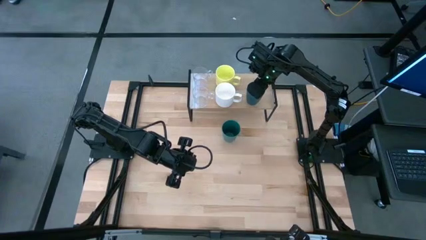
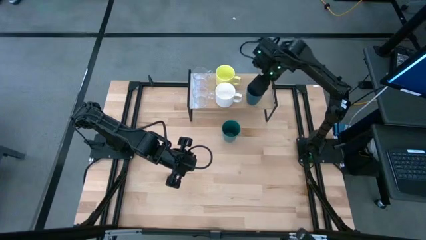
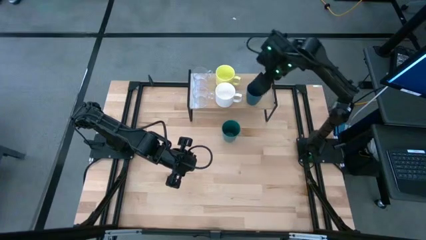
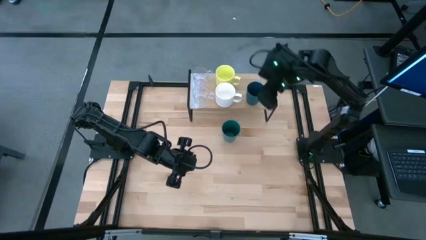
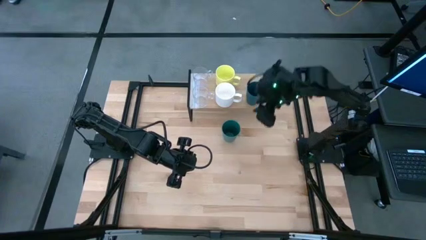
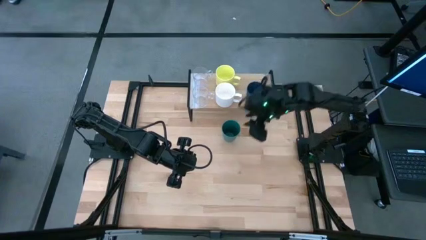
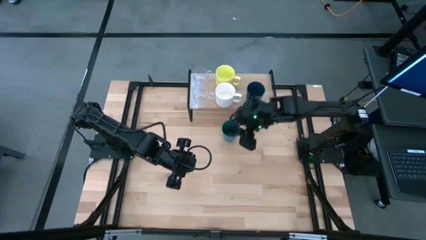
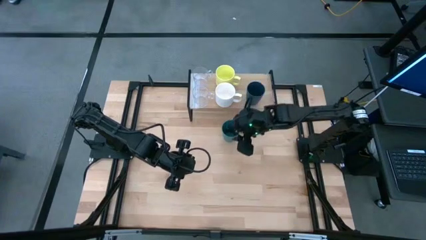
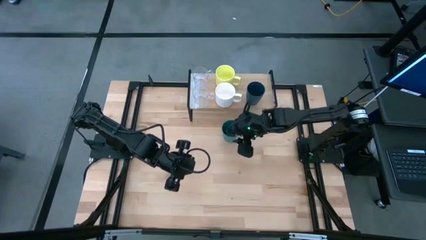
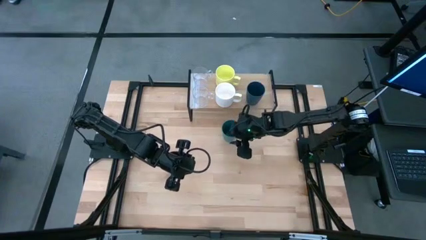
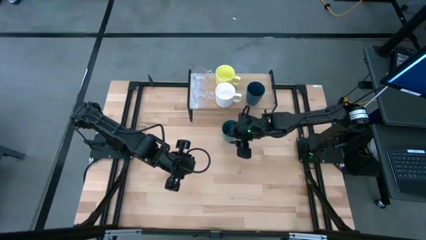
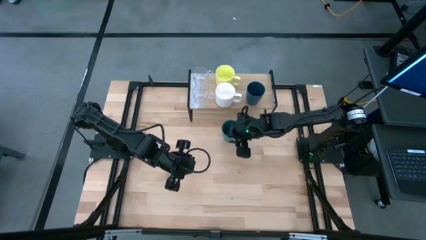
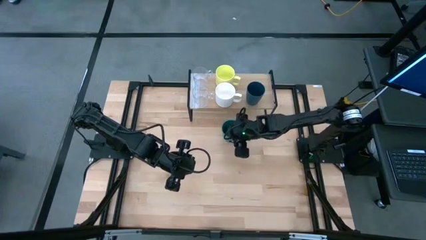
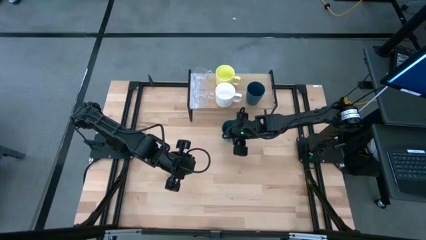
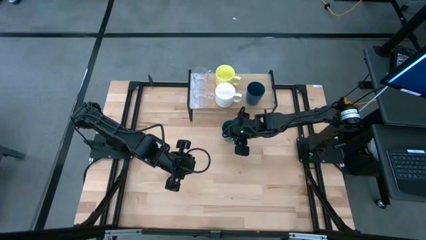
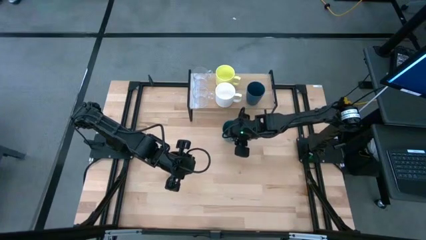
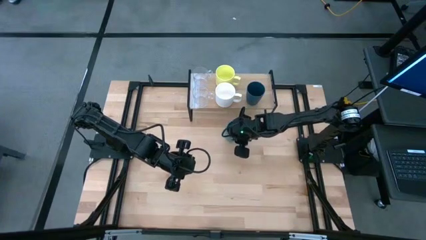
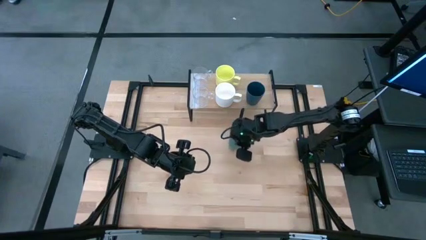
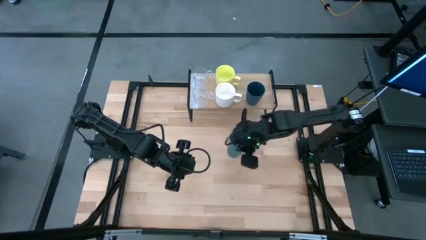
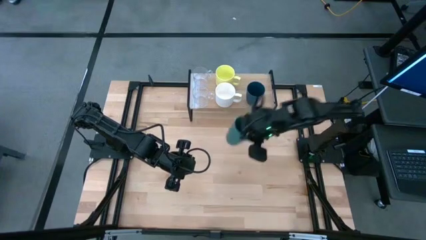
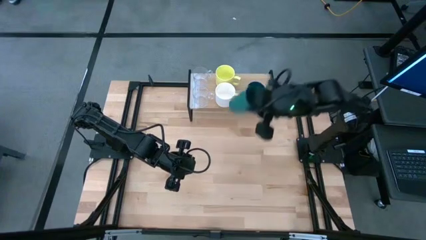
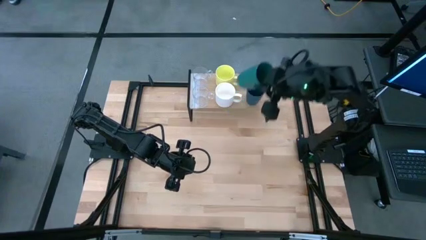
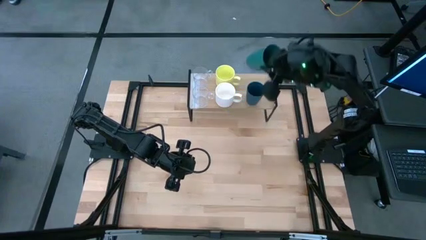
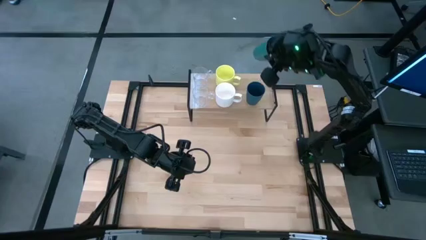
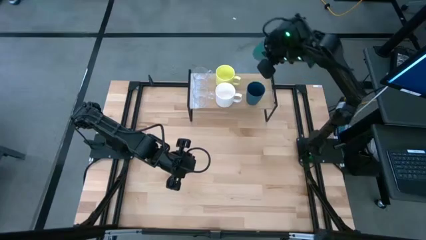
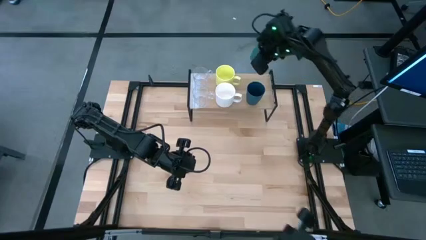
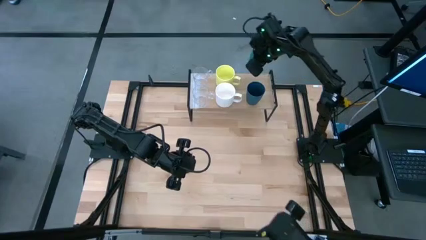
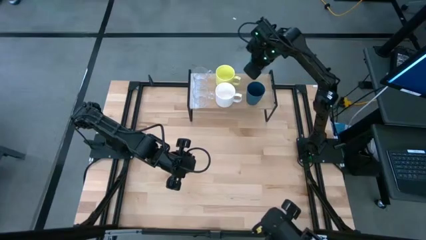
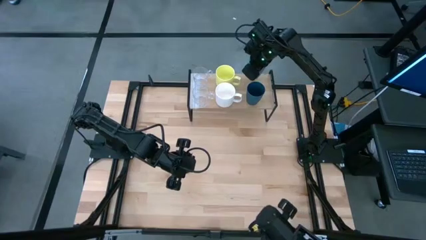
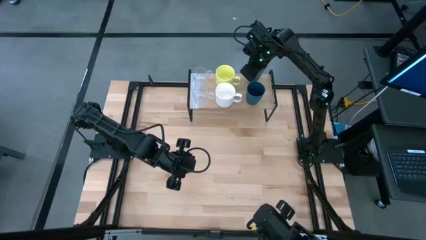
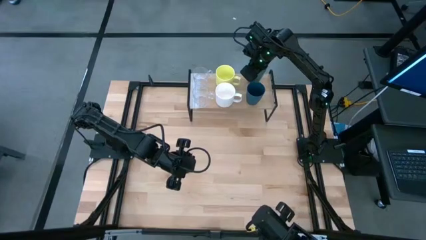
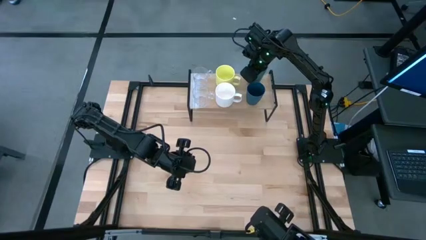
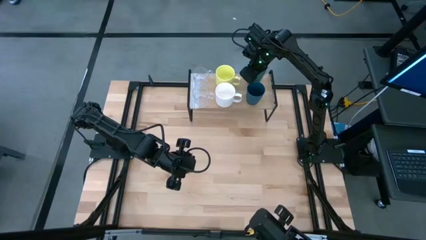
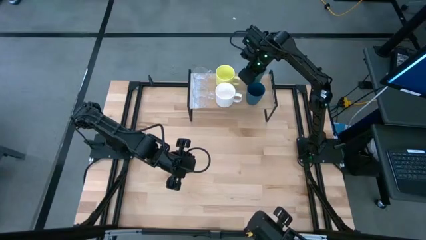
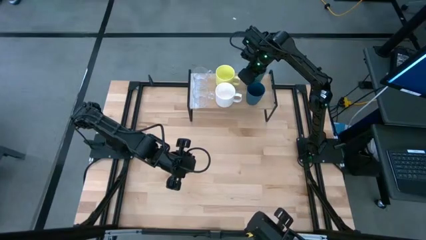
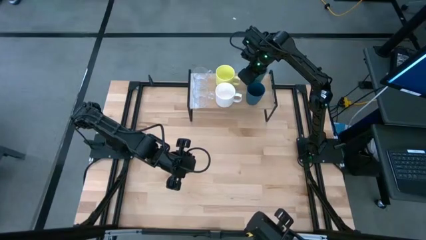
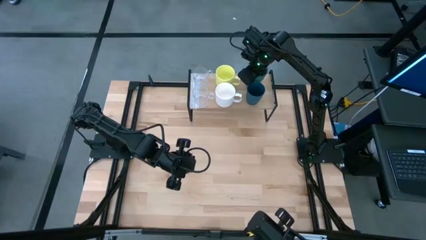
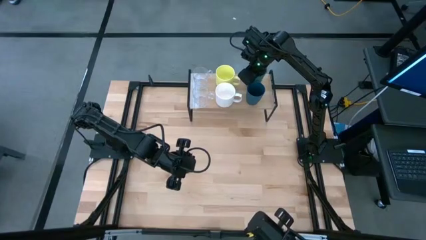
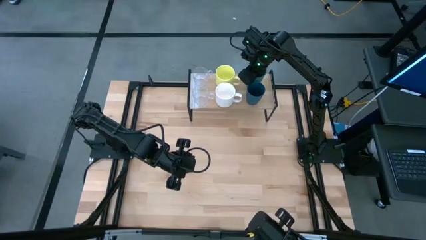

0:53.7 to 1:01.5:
Task: Stack small to large cups/mugs on shelf
Put the green cup on the shelf

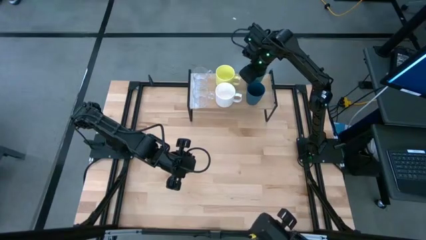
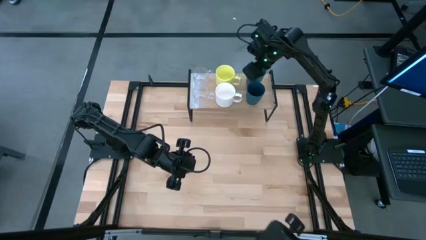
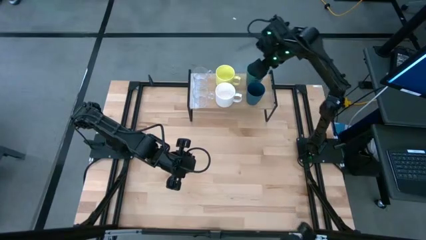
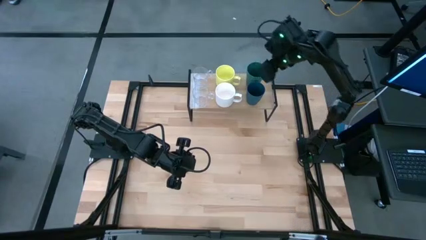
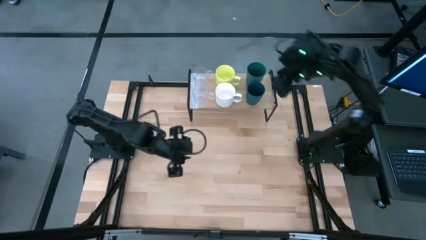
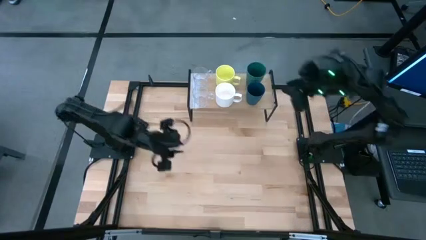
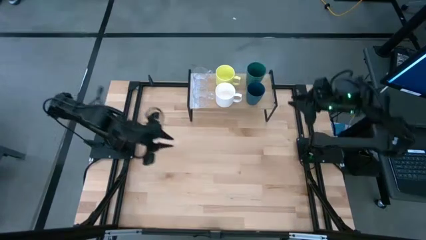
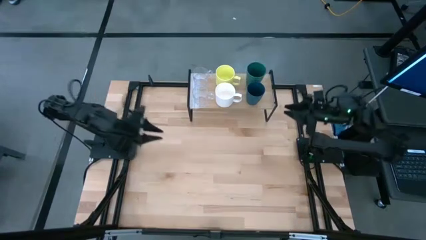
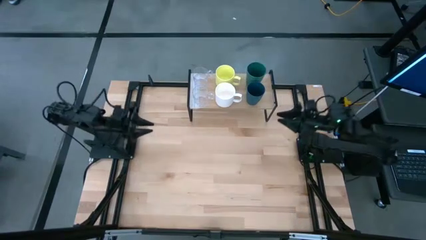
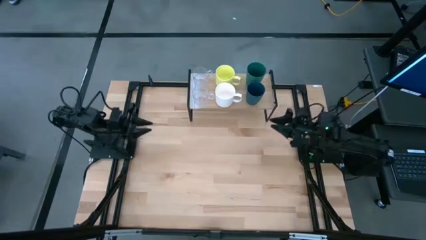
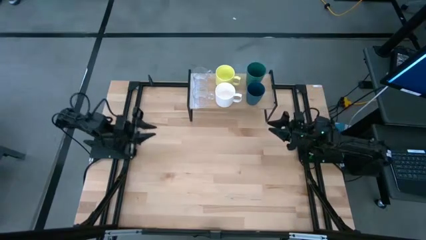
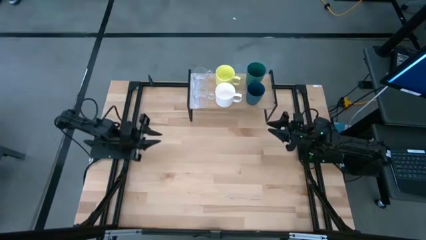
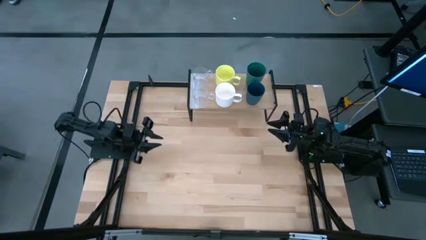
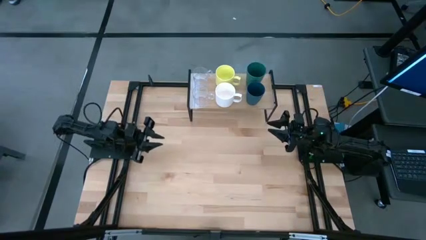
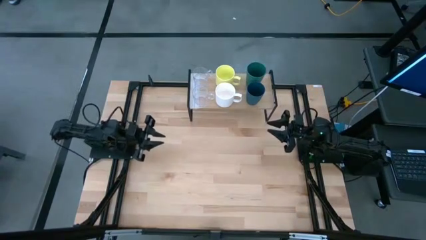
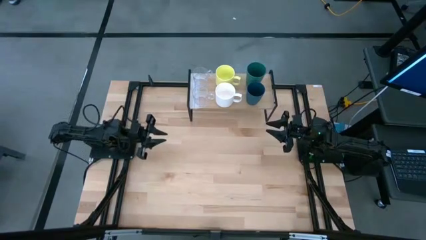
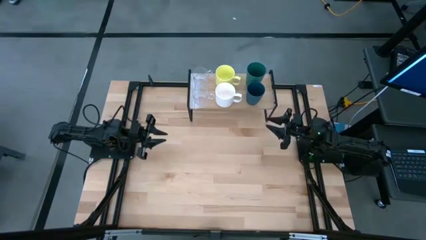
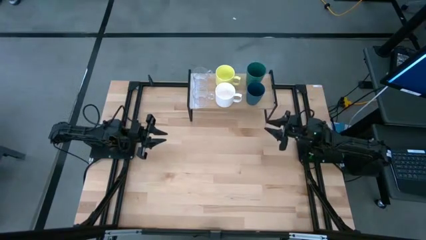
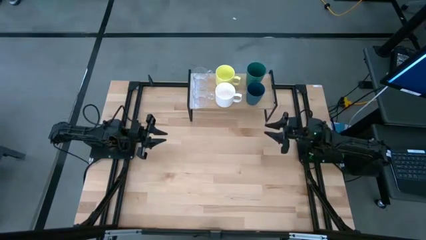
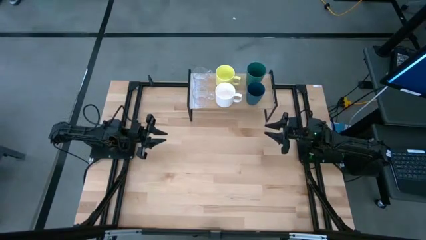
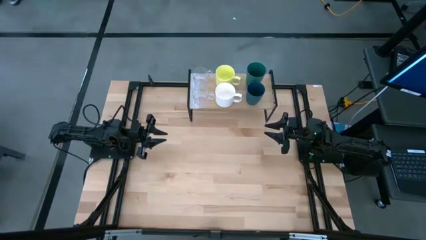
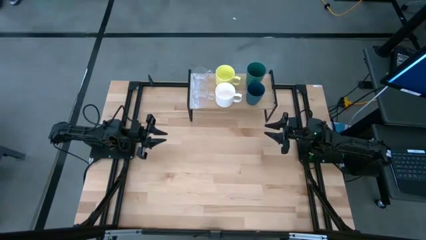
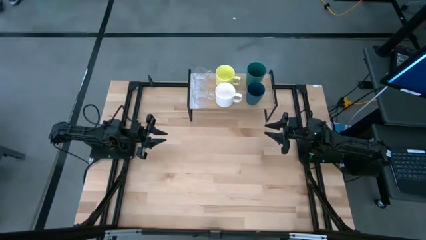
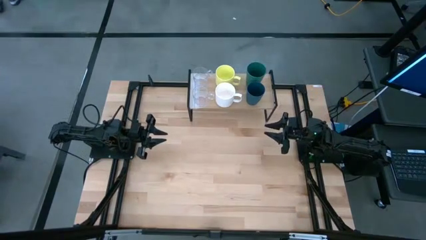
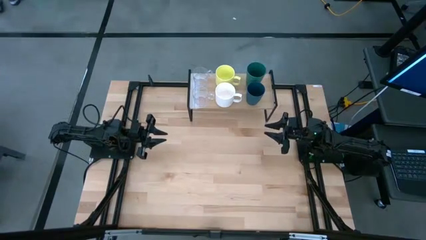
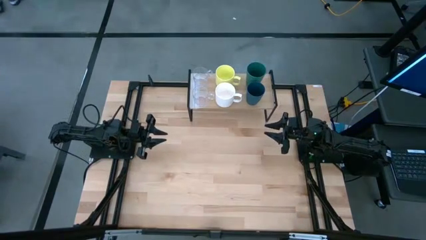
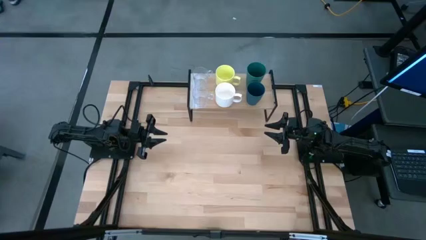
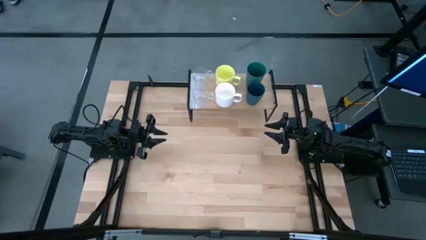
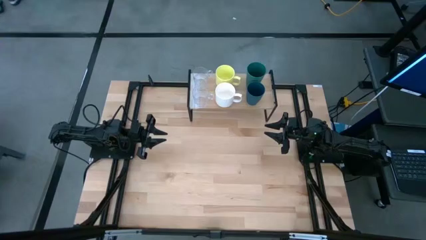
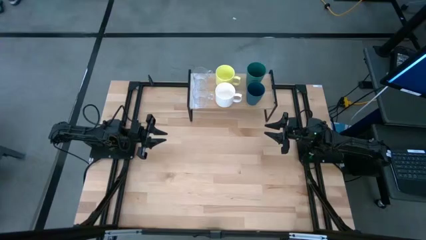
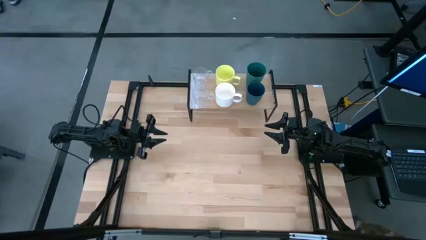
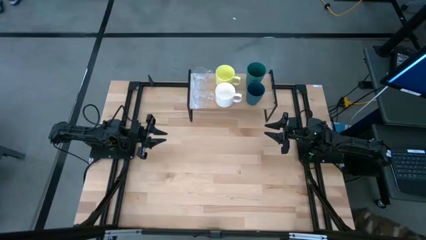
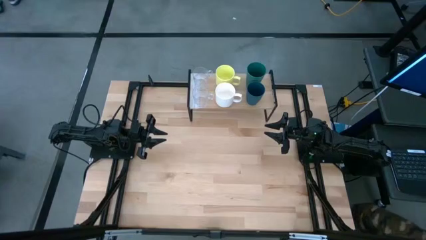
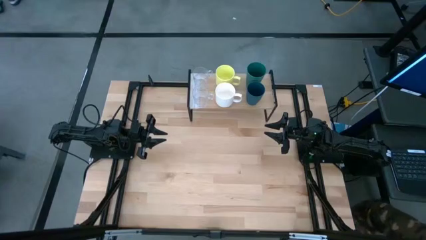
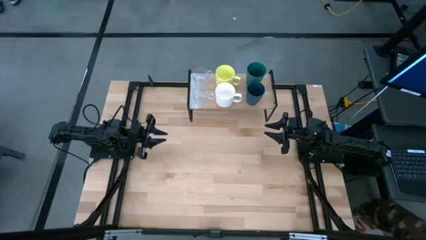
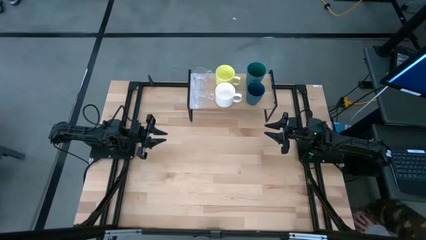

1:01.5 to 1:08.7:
Return to Home Position

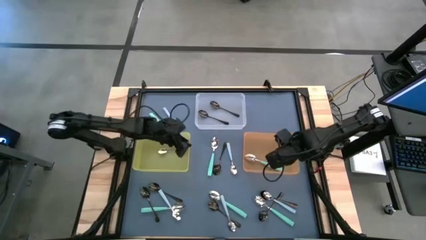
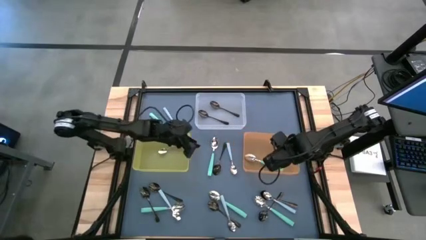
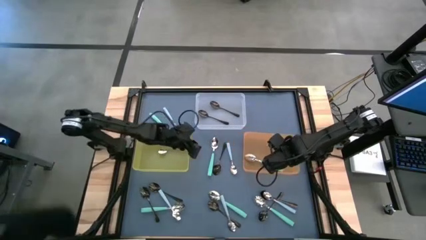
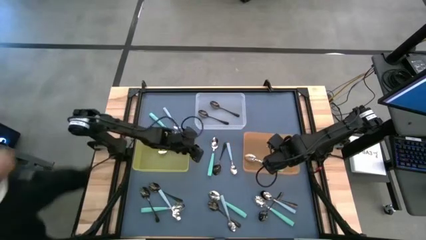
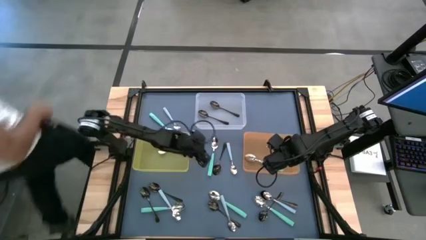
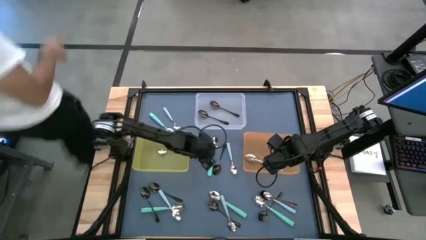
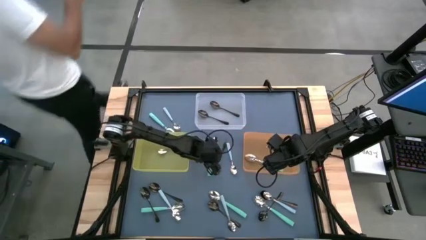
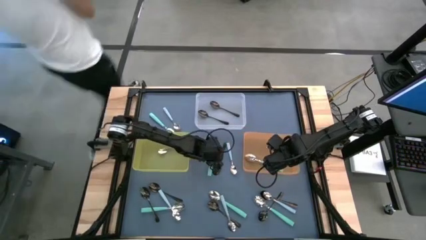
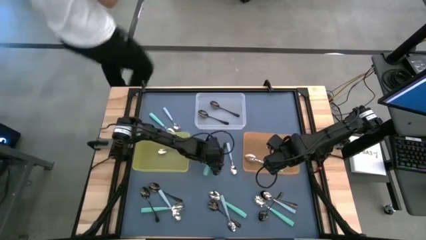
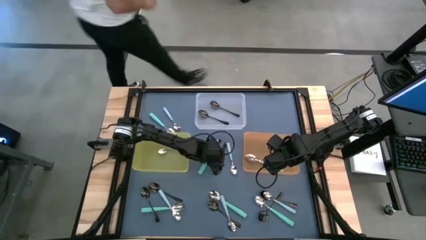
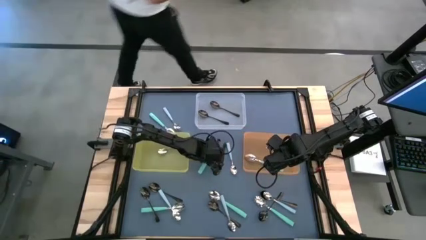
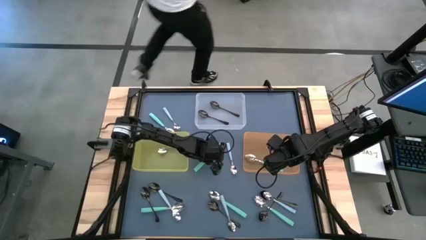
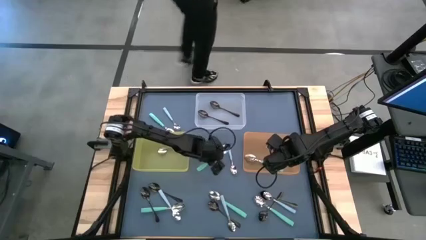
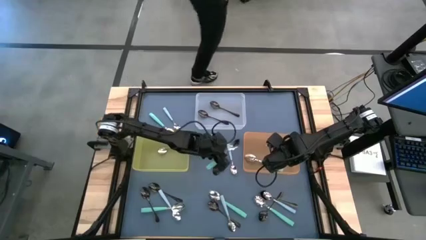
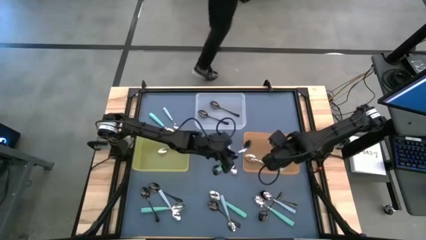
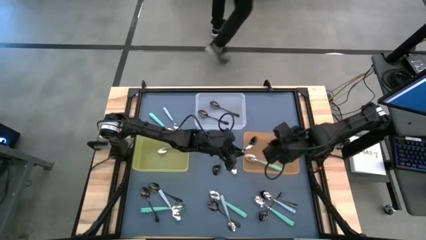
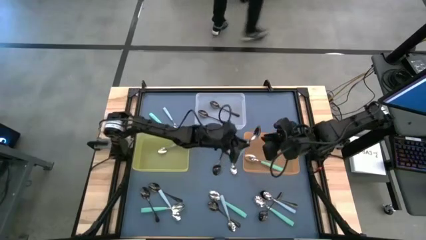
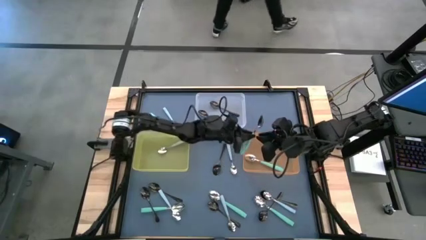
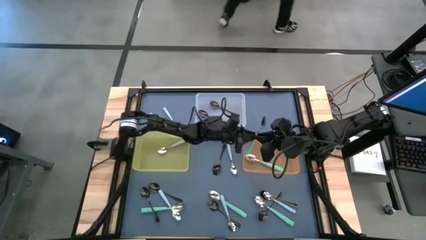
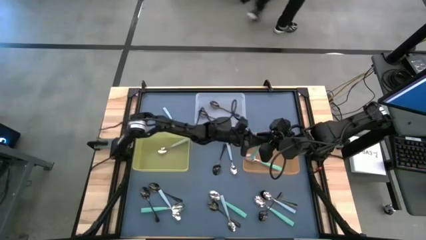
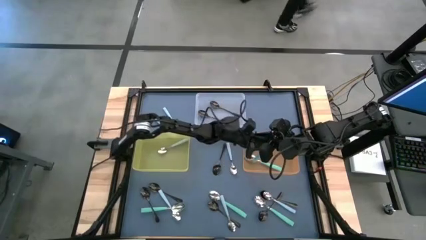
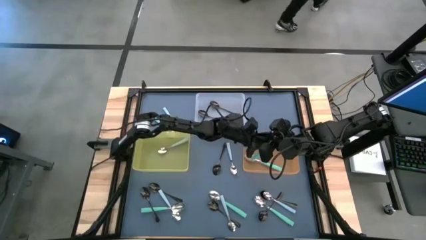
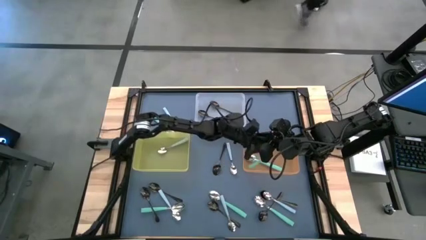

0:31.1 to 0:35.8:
Task: Sort silverware by color (type)
Put the green spoon into the orange bin
